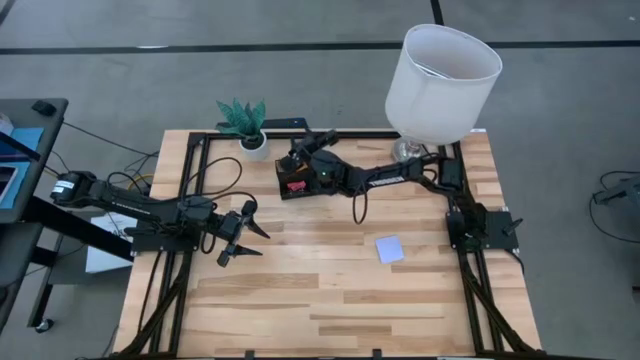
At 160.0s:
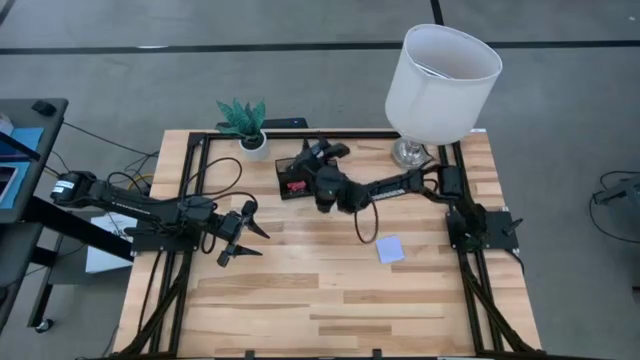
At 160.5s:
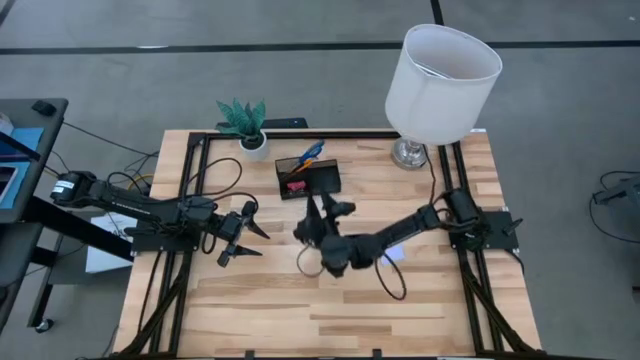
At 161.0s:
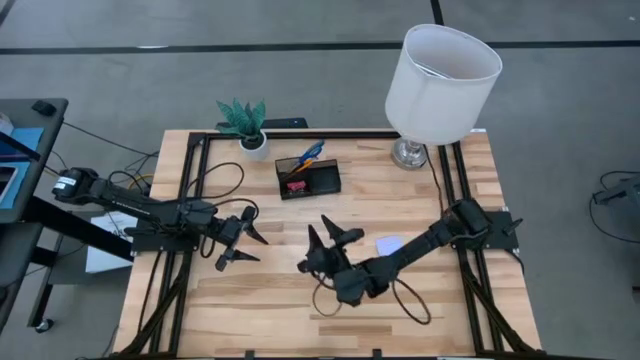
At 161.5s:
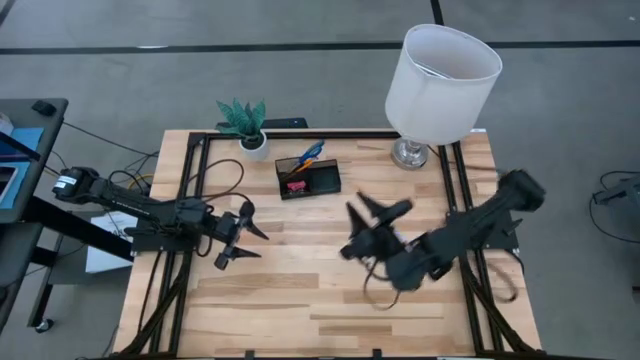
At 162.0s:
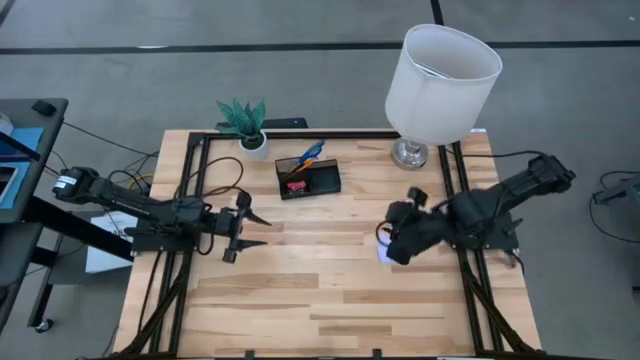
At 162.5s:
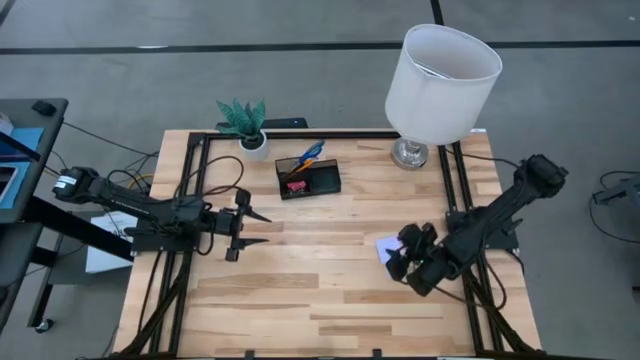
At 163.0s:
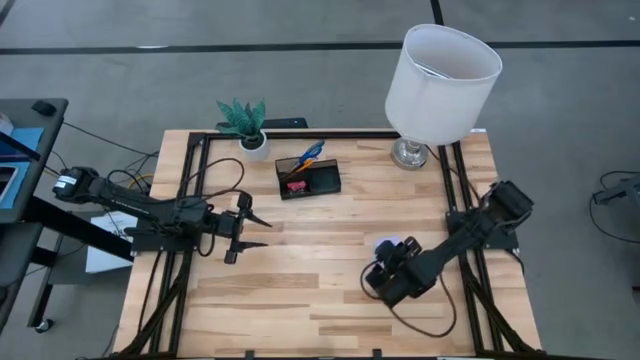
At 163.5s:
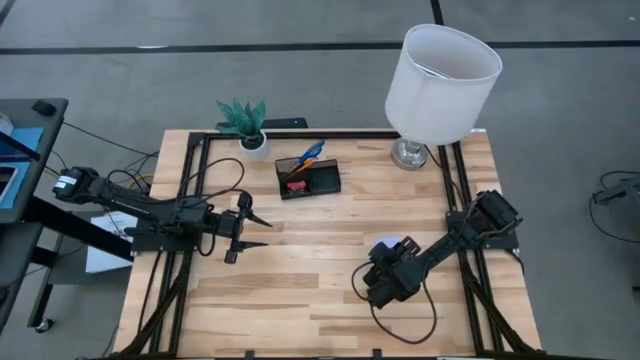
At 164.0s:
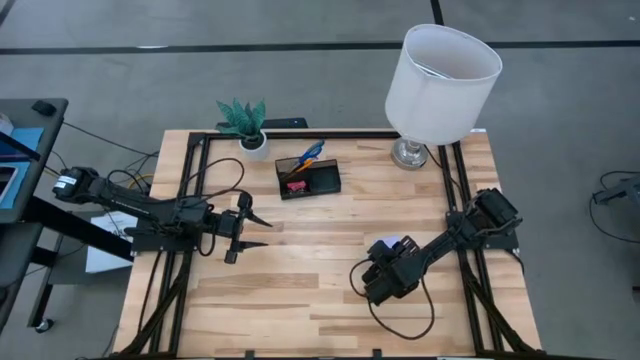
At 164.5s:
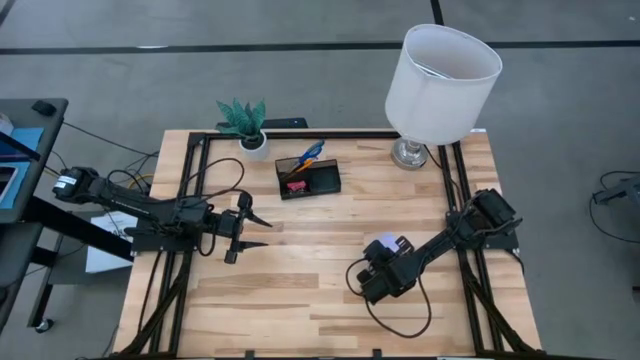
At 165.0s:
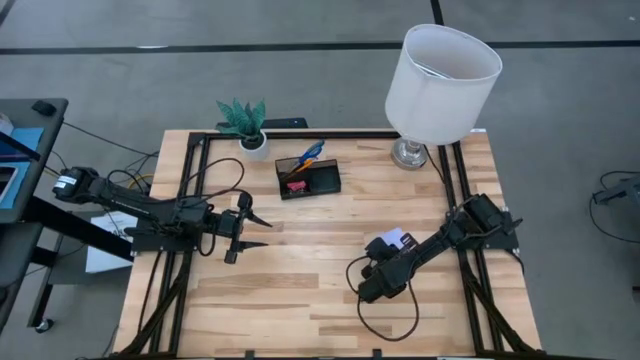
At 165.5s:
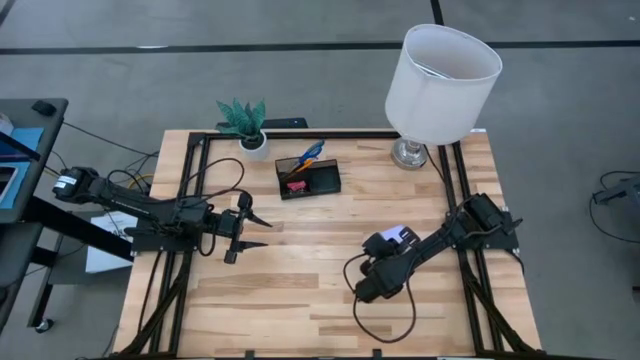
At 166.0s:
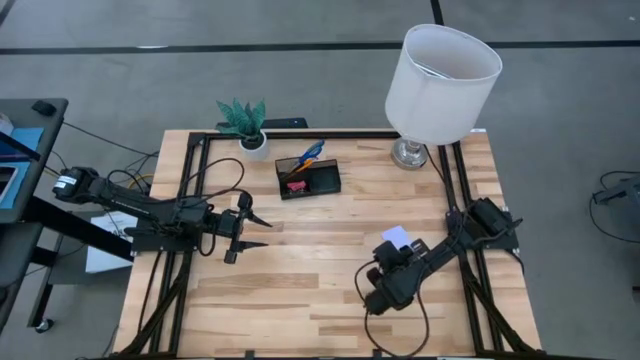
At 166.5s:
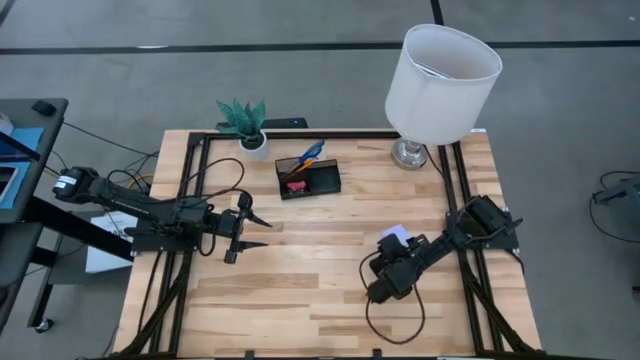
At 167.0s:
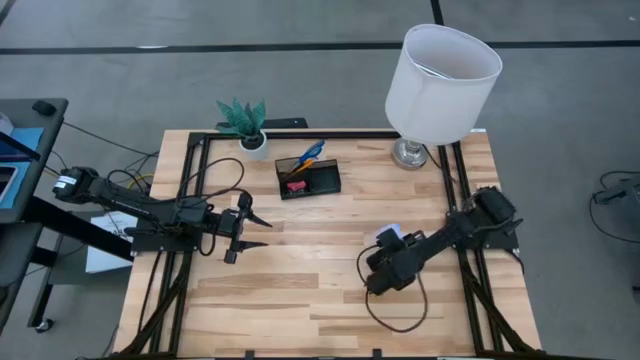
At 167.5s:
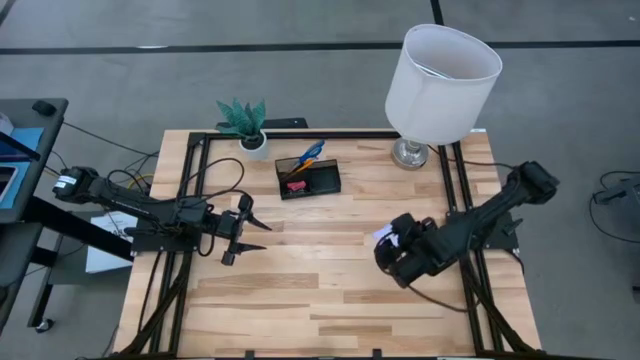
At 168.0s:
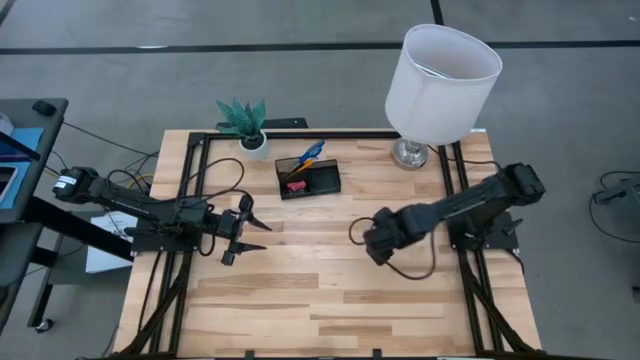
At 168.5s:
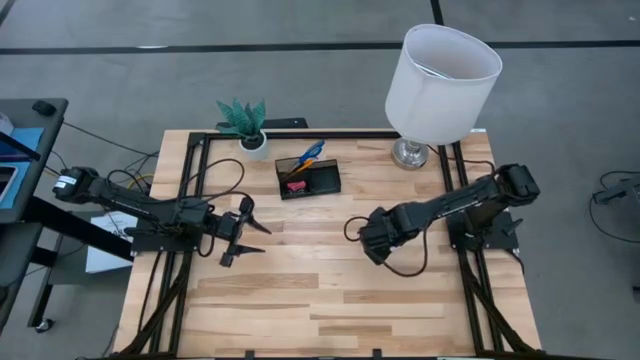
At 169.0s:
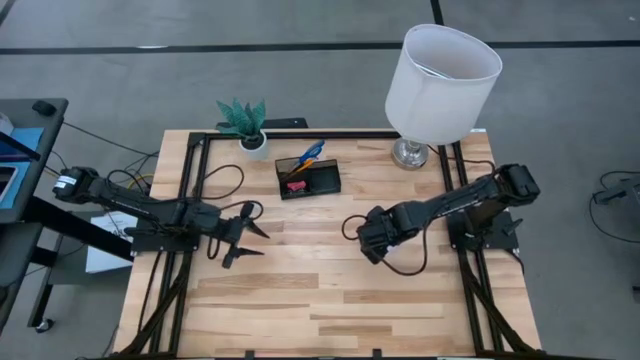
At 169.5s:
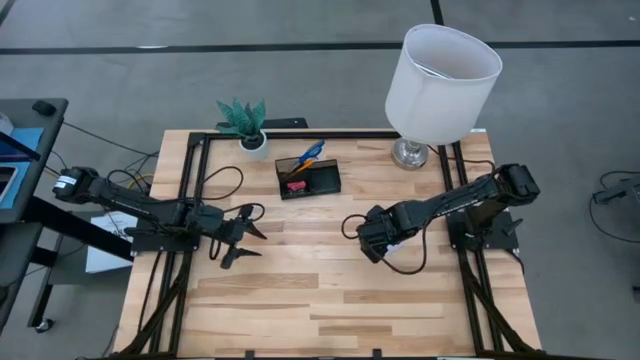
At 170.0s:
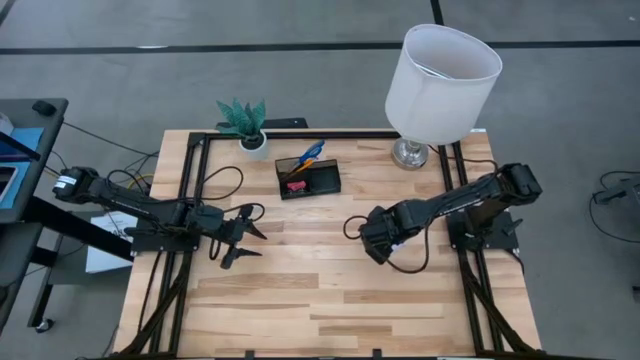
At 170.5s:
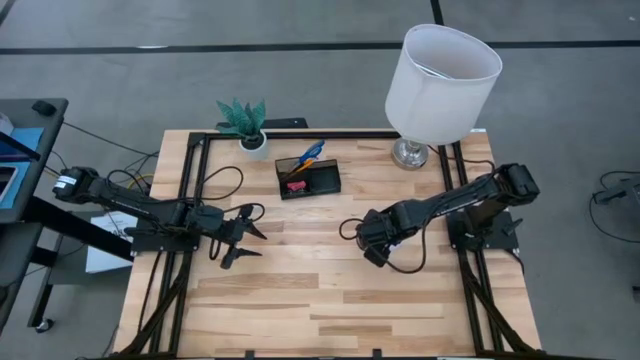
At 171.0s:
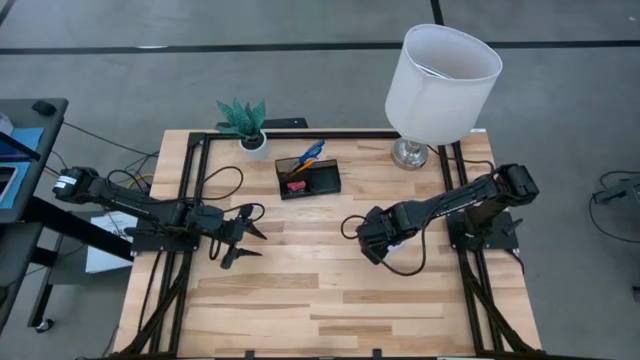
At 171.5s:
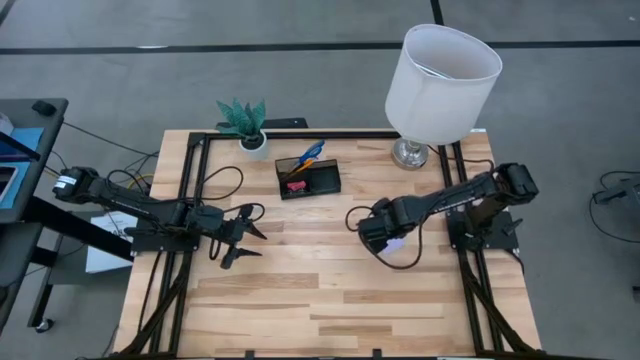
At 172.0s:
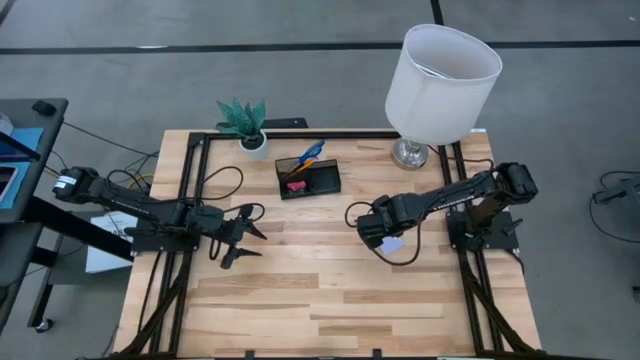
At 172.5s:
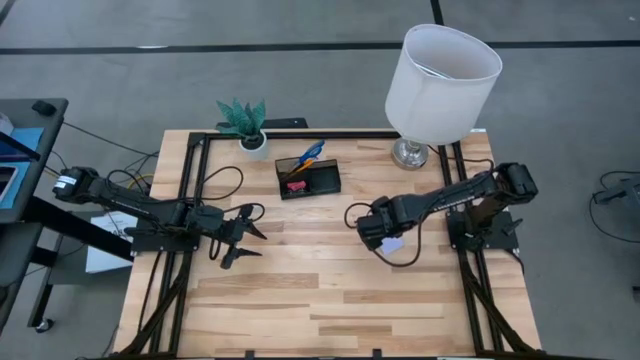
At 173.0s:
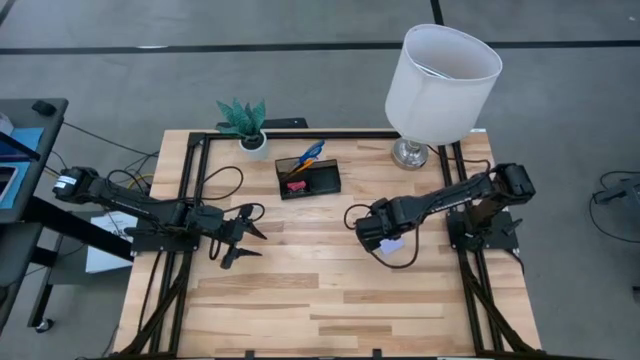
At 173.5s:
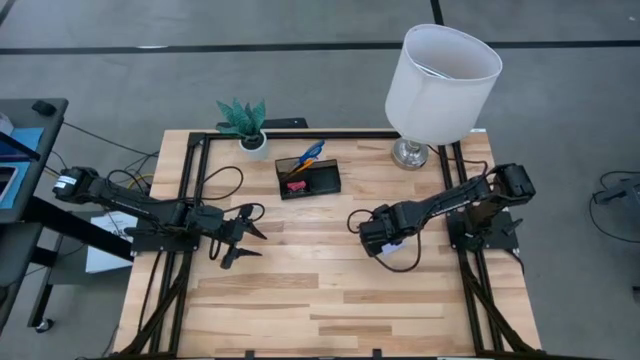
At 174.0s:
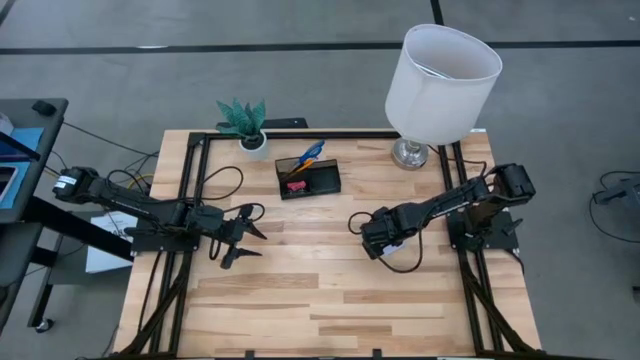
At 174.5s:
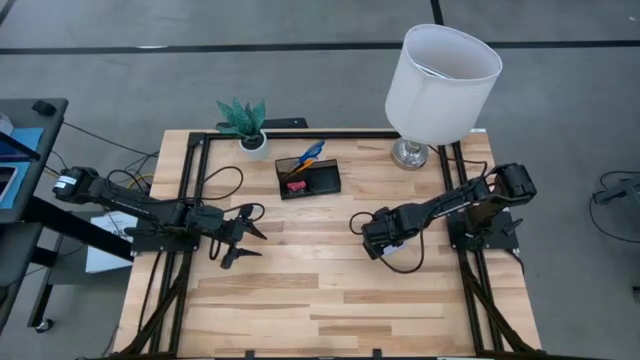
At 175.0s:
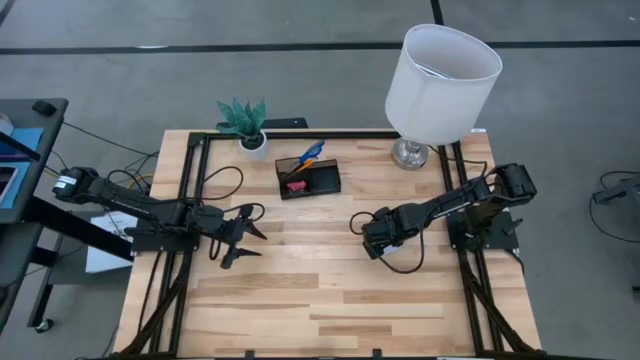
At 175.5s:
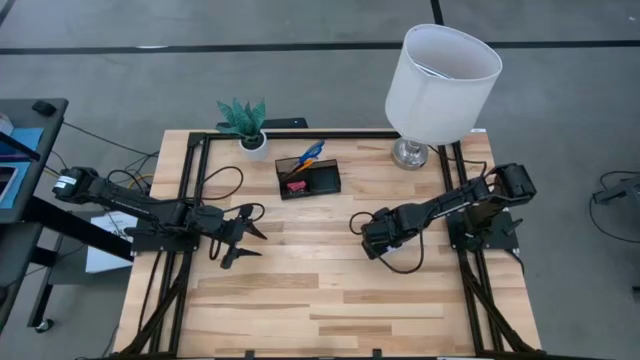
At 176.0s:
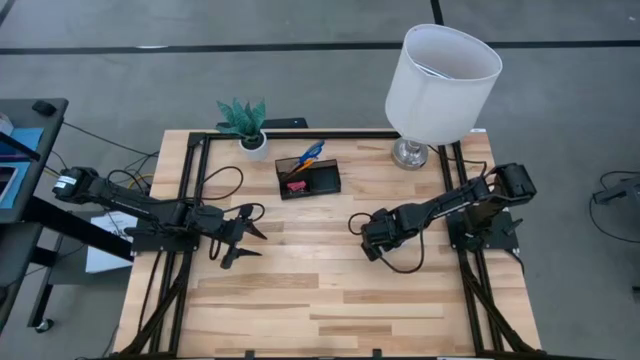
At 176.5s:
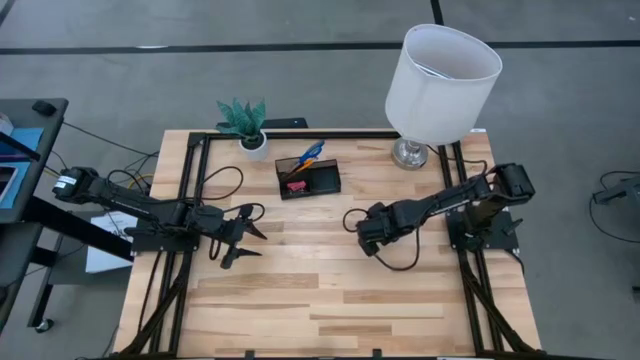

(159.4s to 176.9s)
Task: Pick and place office supplies into organizer
Put the purple sticky note into the black desk organizer

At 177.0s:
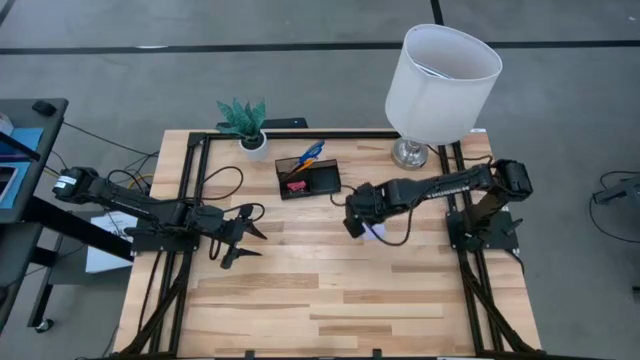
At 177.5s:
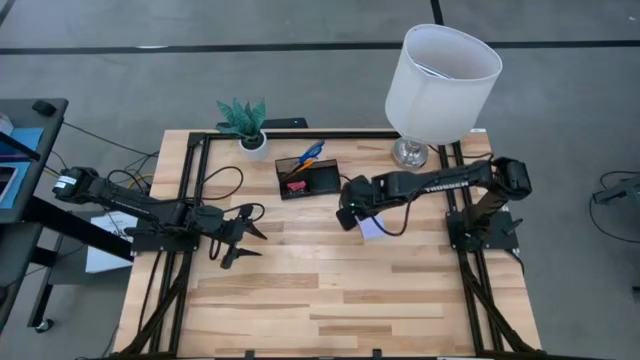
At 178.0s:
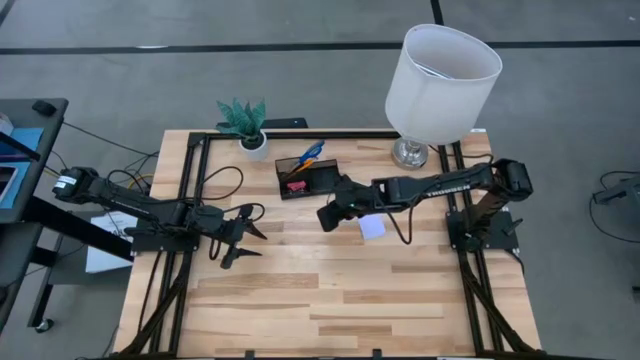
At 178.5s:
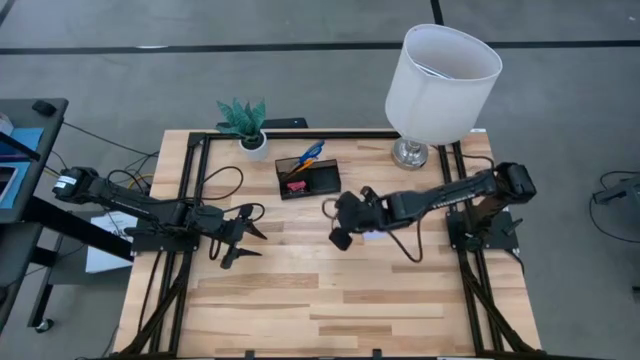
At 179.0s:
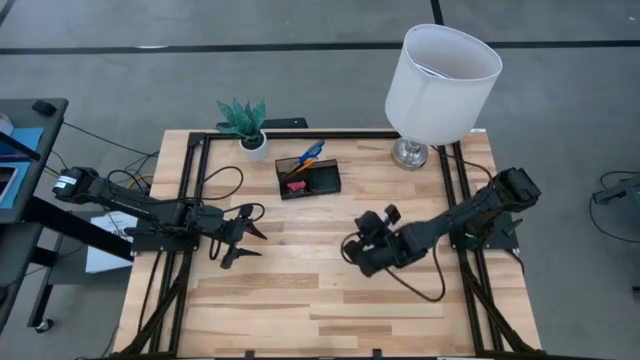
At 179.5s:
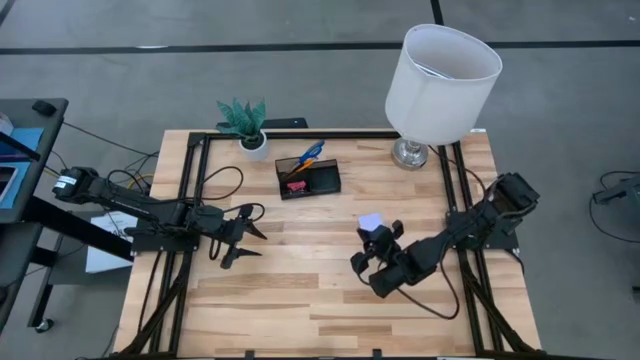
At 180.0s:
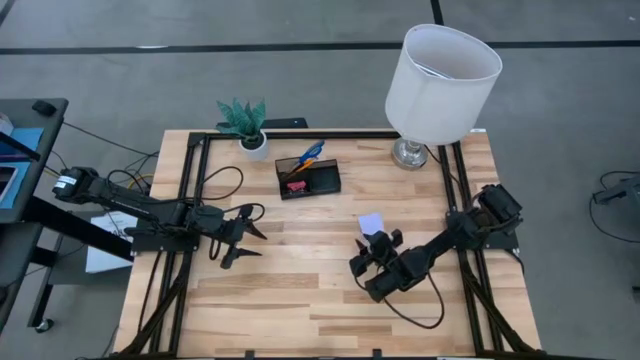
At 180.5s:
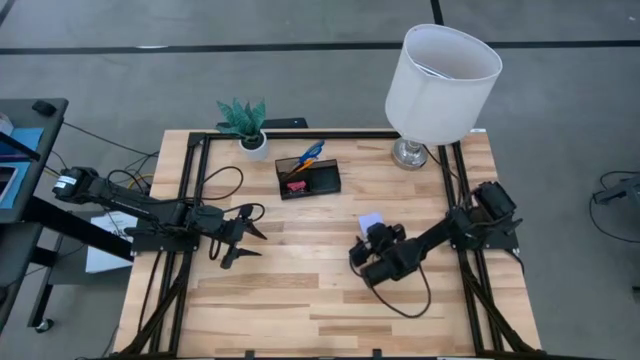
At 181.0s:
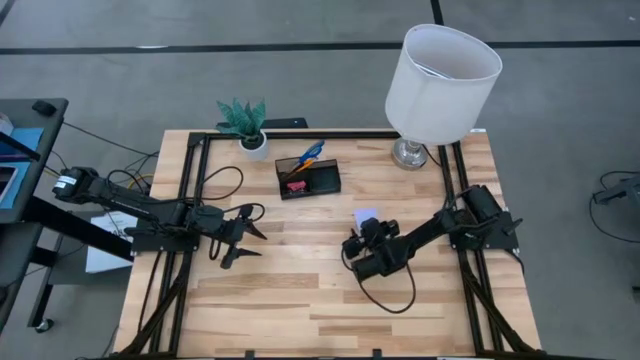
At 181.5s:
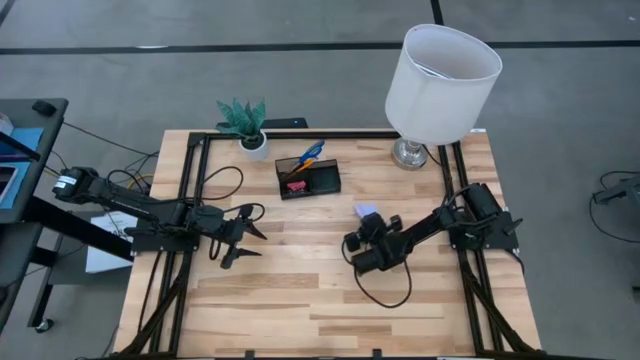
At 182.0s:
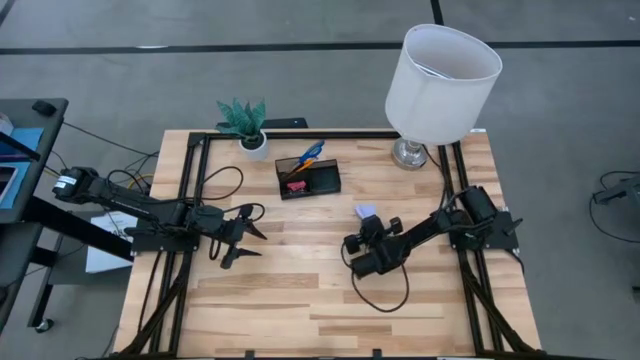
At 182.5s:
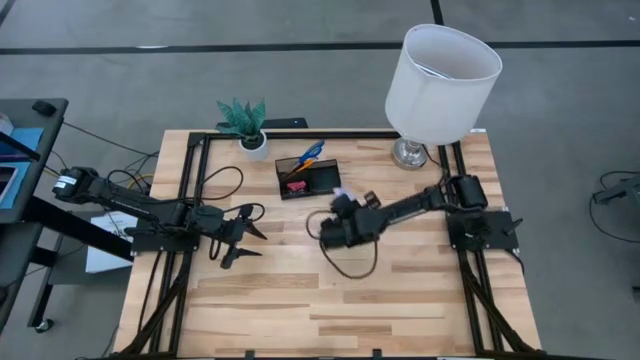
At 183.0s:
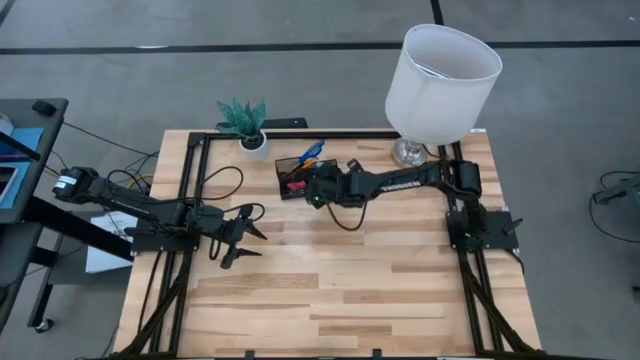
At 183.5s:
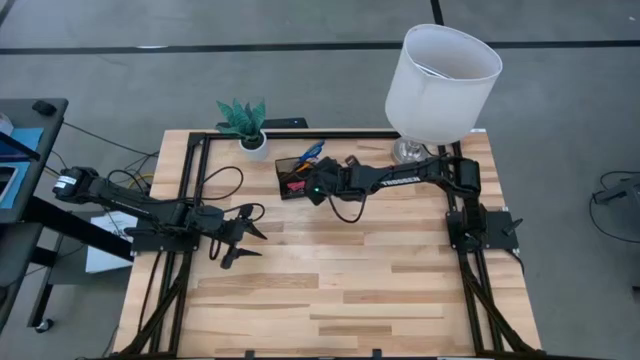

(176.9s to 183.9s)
Put the purple sticky note into the black desk organizer
